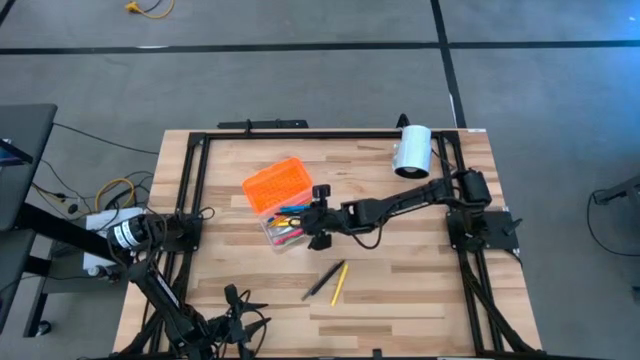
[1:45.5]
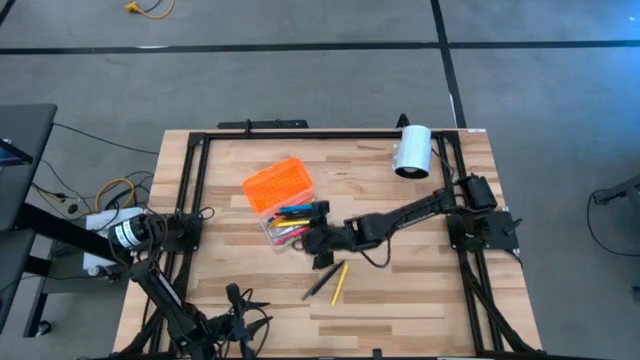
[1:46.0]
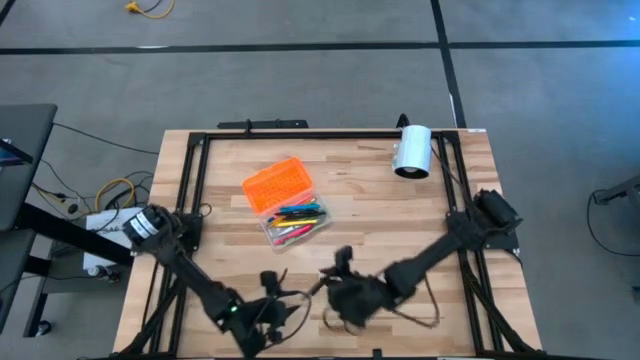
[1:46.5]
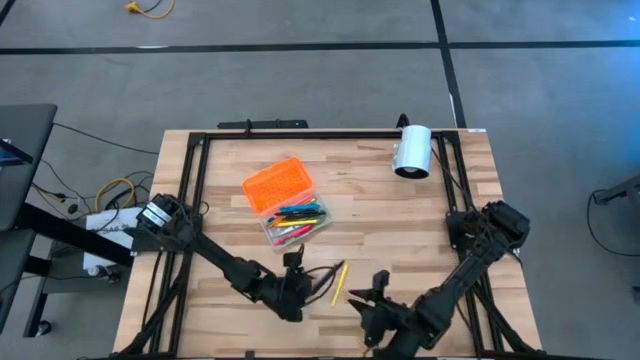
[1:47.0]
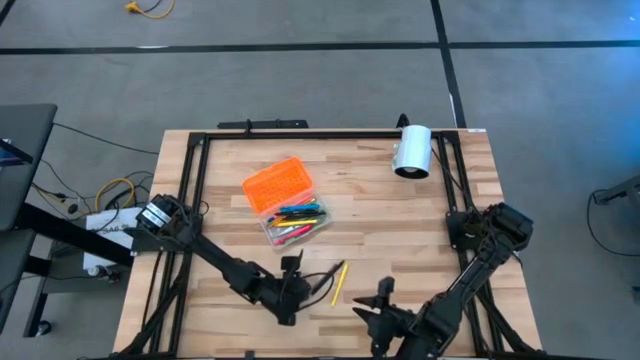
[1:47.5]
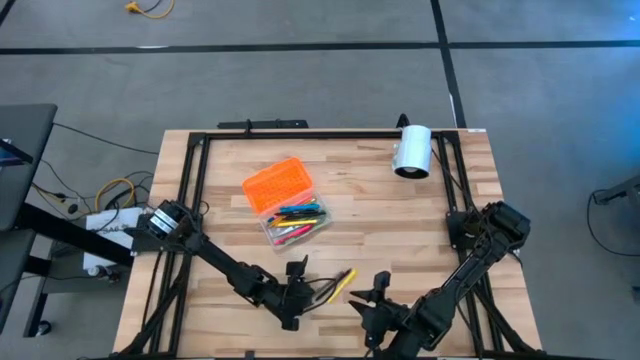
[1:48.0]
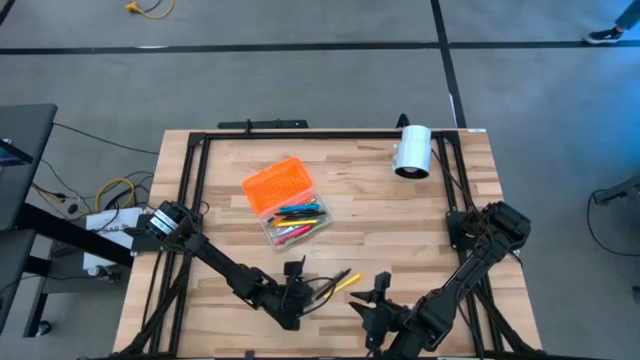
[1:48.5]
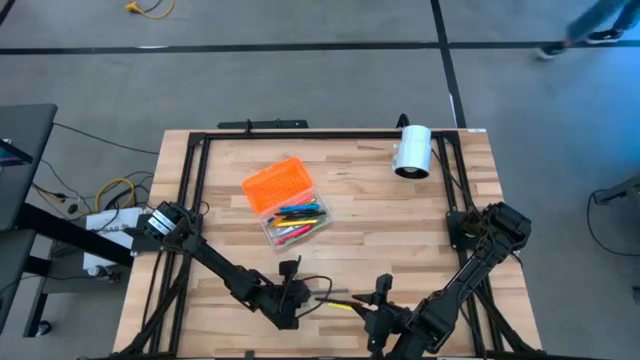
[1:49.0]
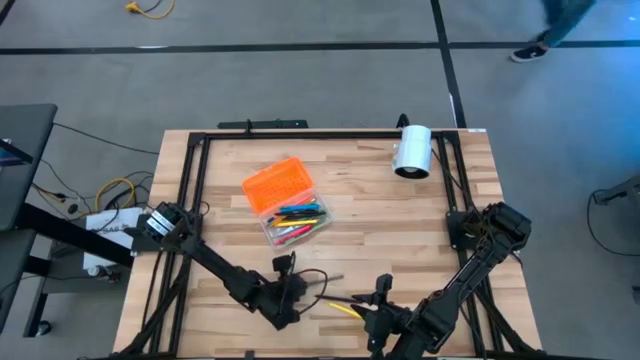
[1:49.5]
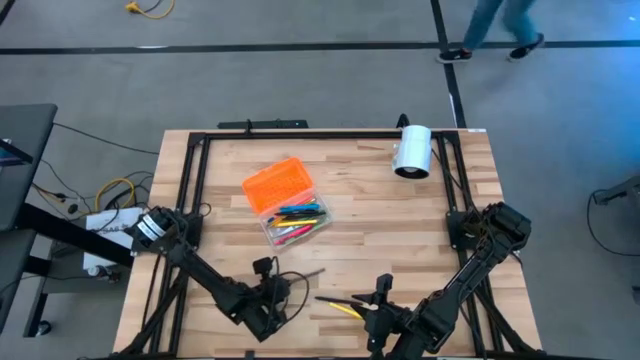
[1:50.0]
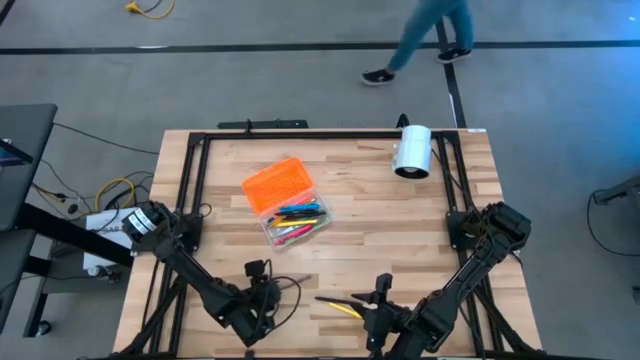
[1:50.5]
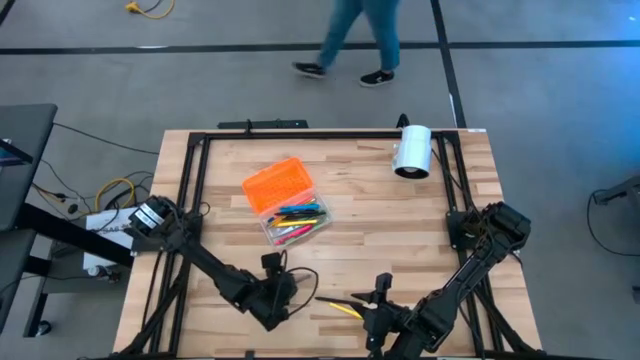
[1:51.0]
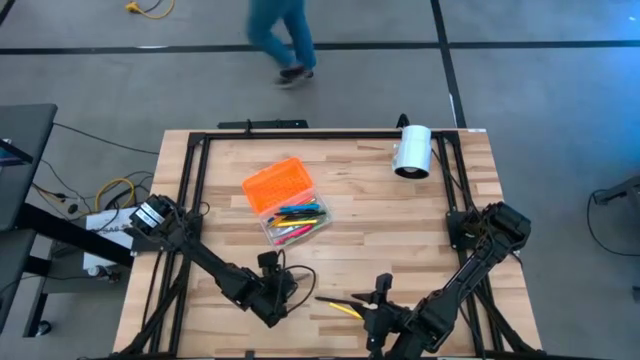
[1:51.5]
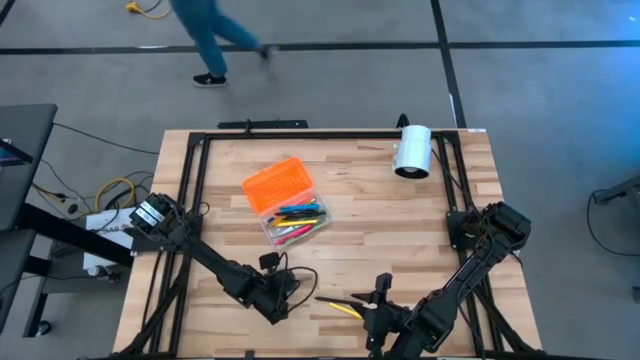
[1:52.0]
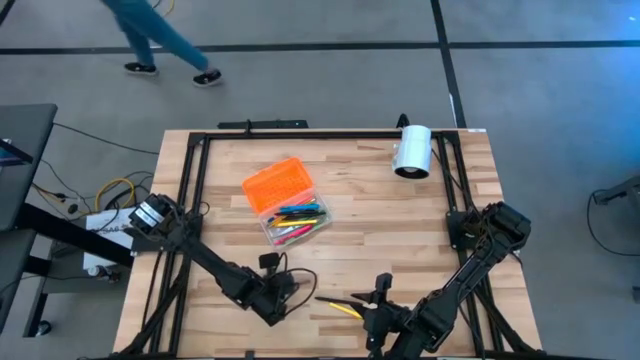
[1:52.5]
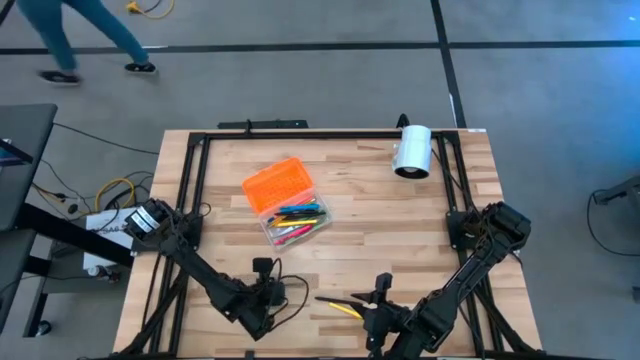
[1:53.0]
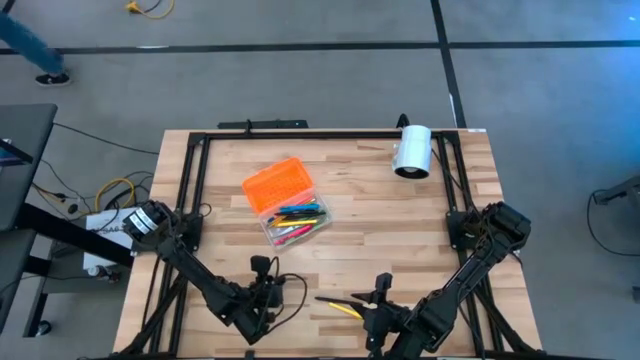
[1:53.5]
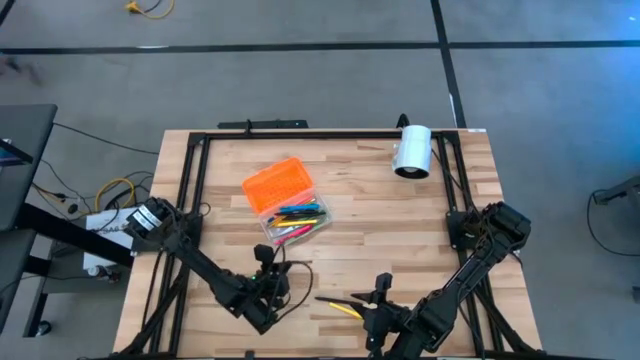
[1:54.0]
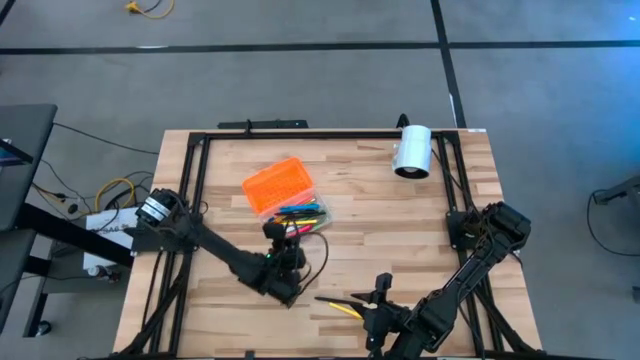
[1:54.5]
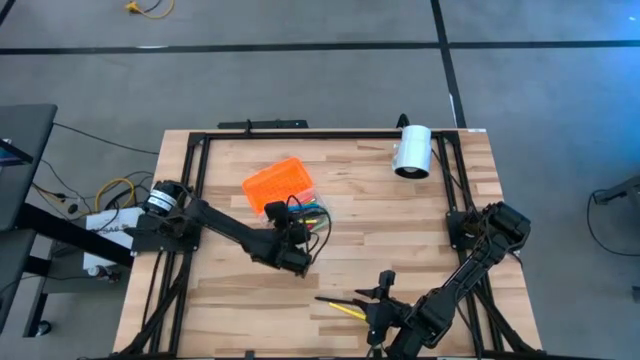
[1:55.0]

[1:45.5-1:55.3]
Task: Pick & place school supplies into a supply box
Put the gray pen into the supply box

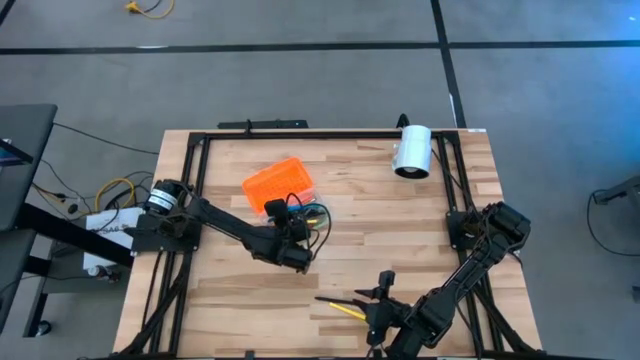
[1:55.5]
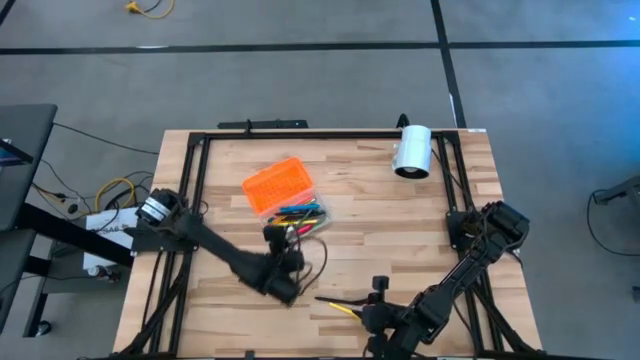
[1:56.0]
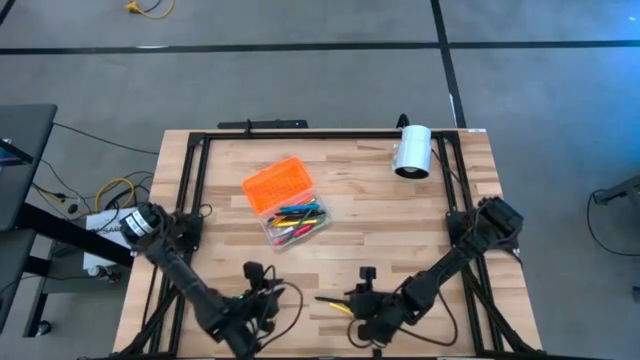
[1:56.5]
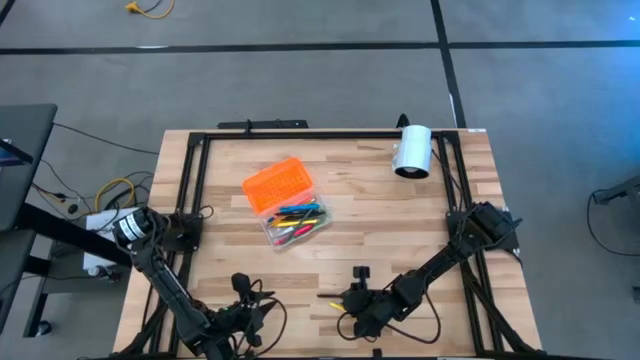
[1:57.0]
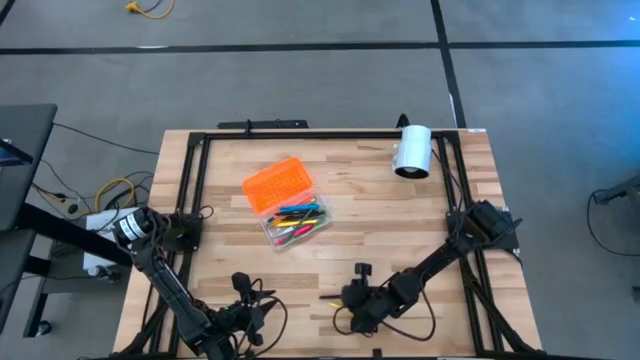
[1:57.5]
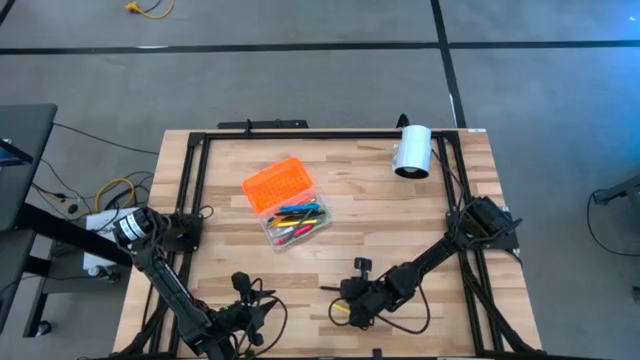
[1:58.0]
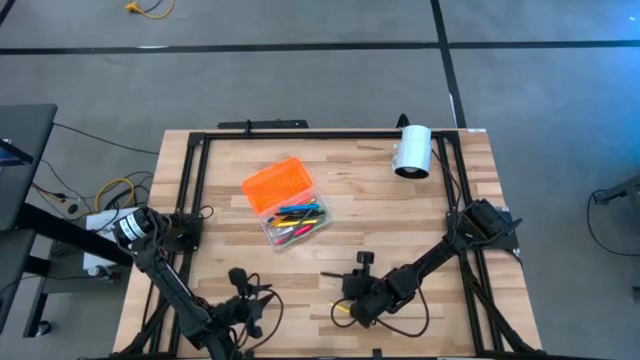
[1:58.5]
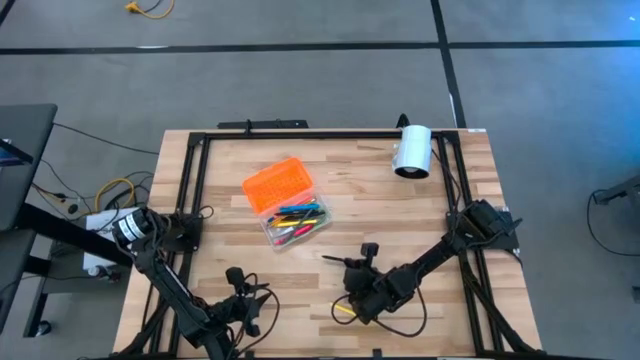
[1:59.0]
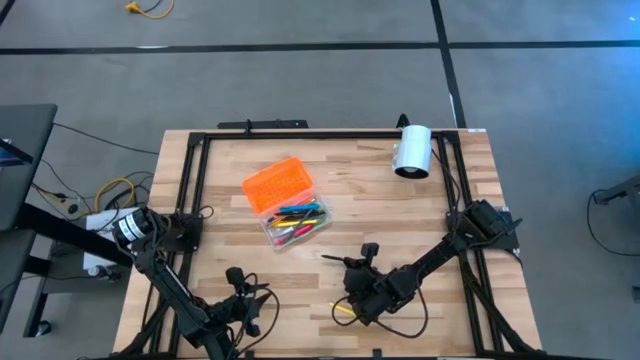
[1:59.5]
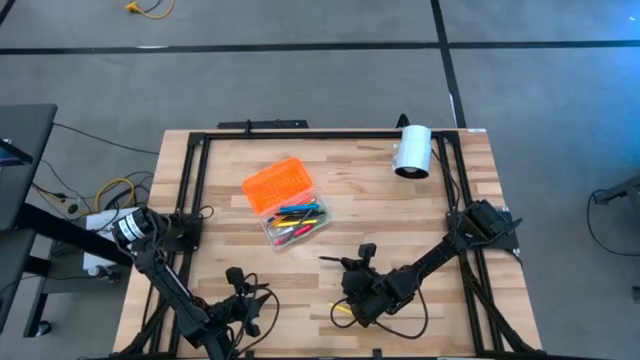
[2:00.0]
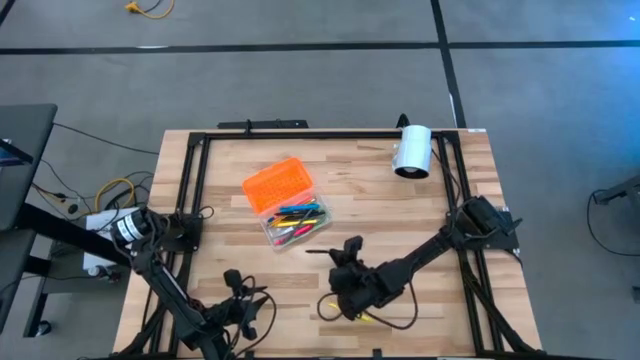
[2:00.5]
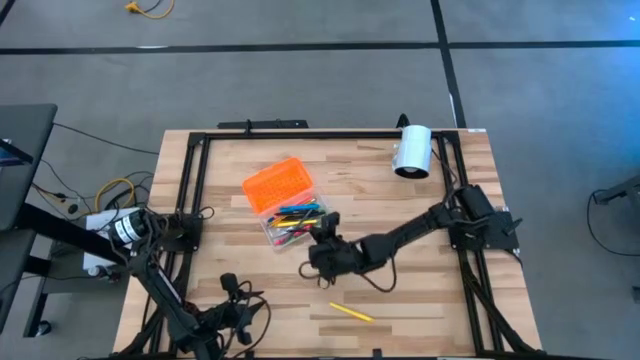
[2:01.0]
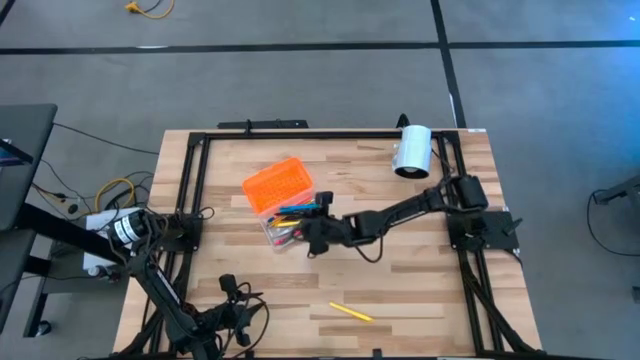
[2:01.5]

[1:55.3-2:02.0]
Put the black pen into the supply box

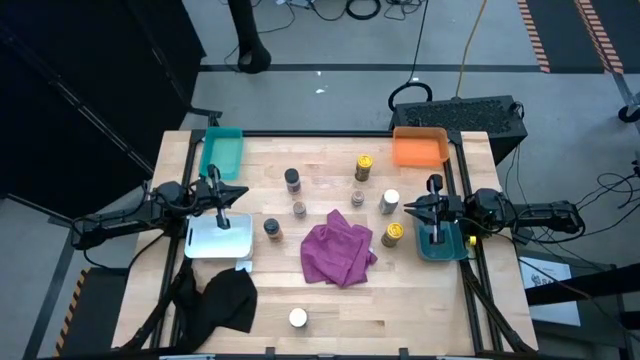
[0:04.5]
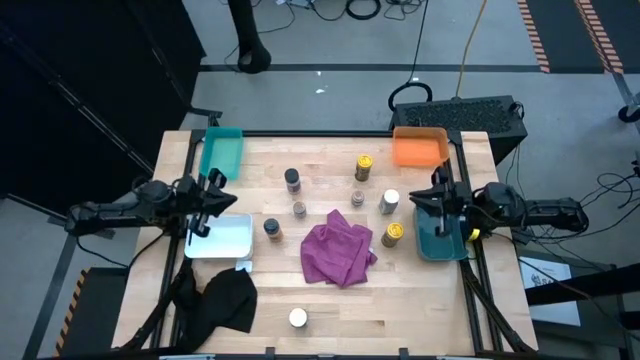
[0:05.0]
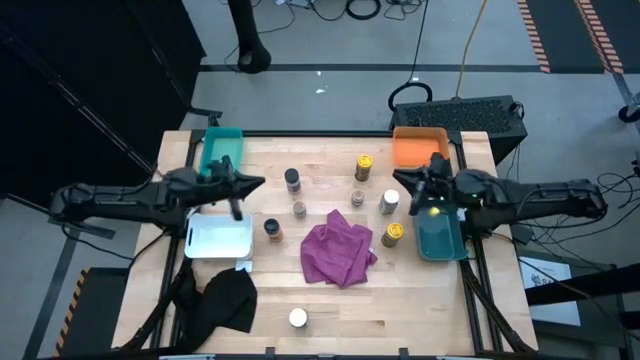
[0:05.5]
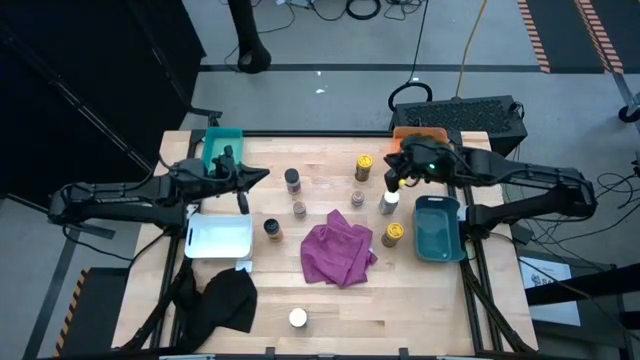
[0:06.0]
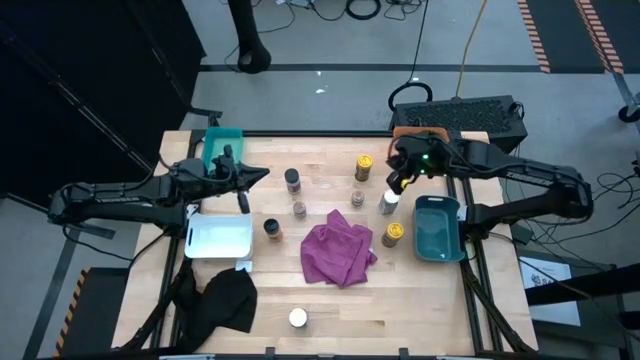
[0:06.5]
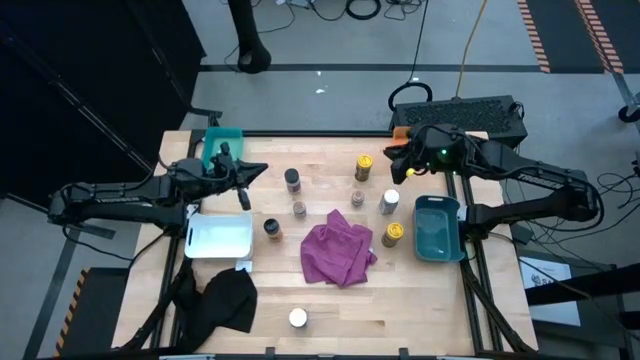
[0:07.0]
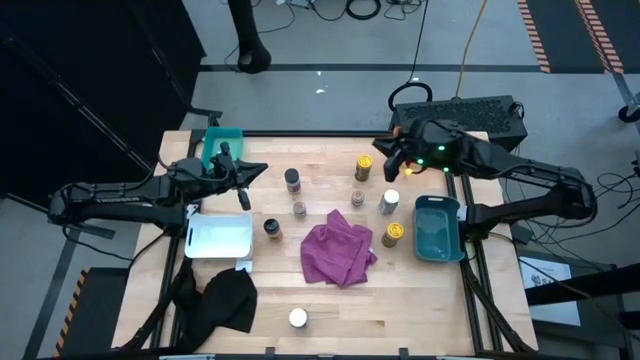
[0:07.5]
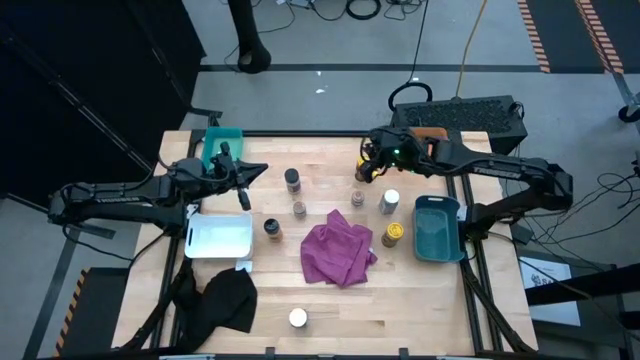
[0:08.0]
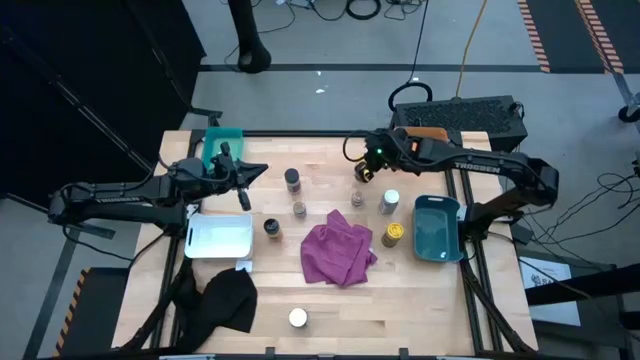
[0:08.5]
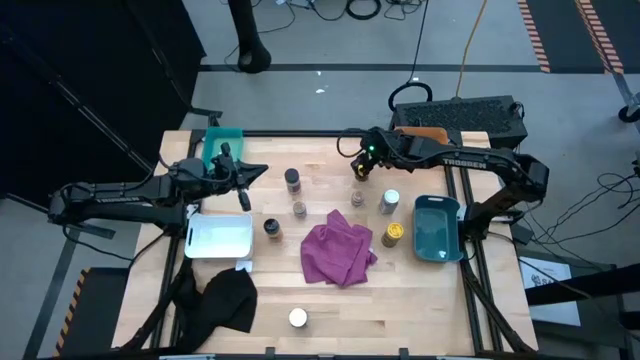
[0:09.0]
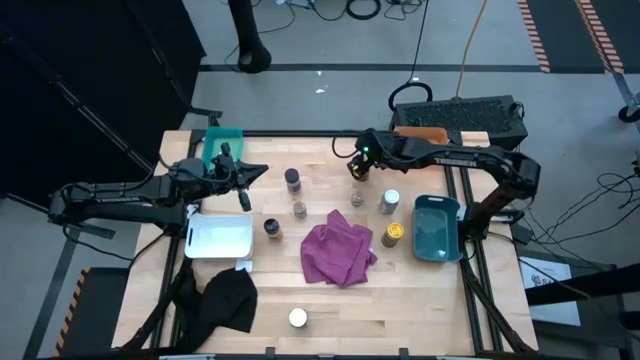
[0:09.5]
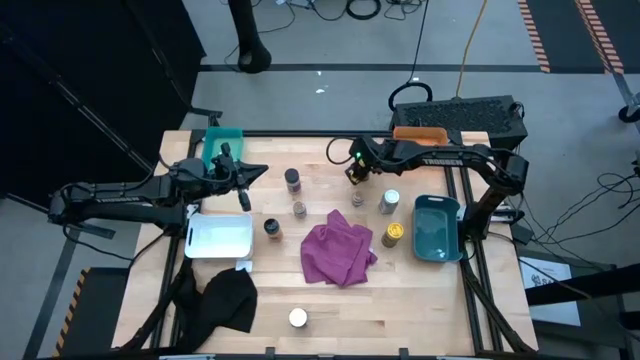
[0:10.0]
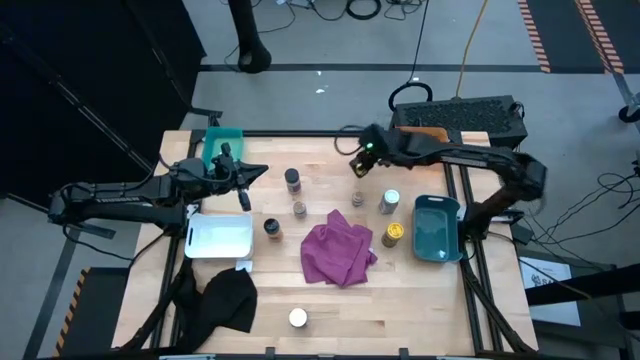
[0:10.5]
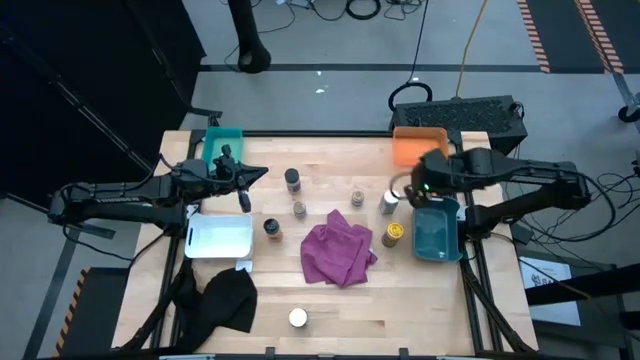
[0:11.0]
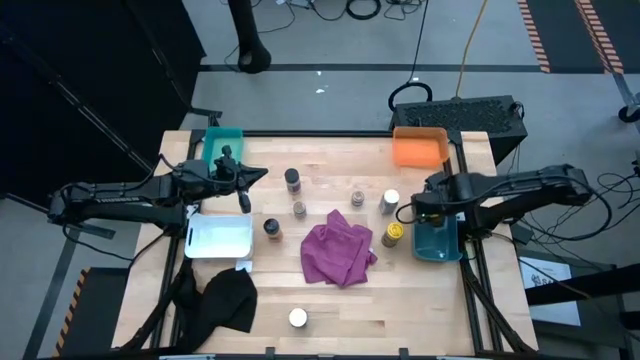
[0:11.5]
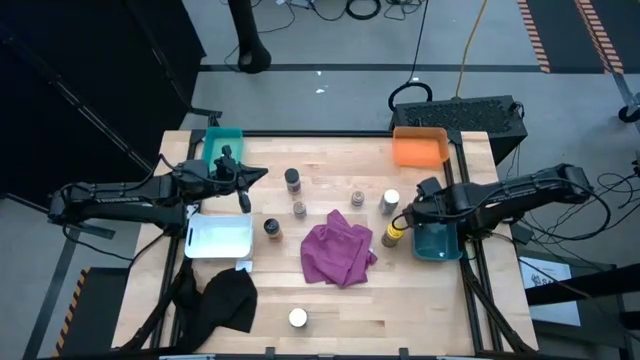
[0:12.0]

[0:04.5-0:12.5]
Task: Sort spices by type
Put the top yellow seasoning bottle into the blue bin
